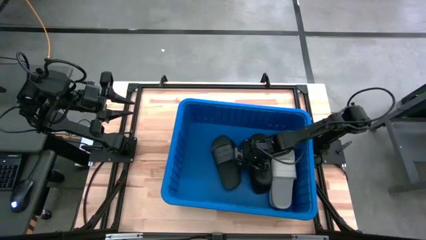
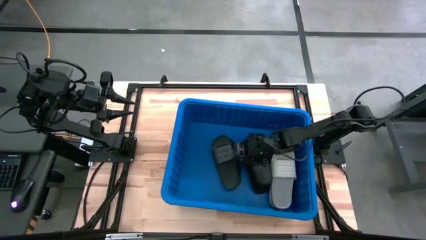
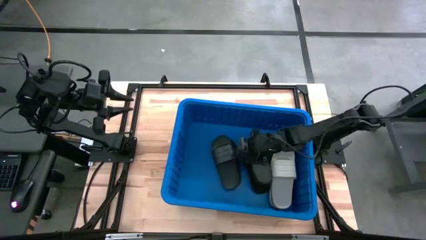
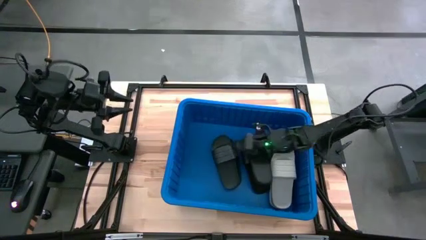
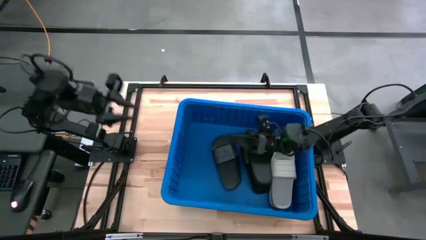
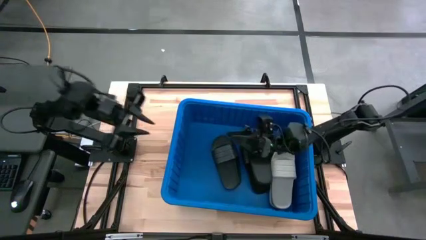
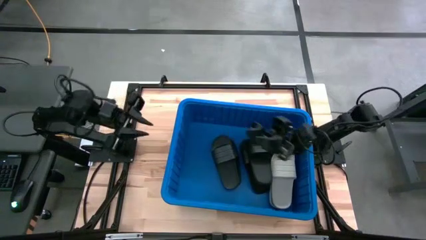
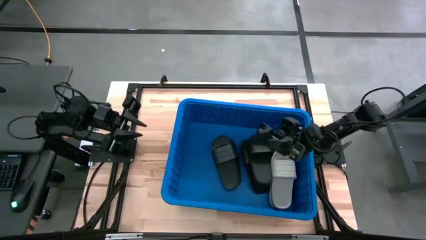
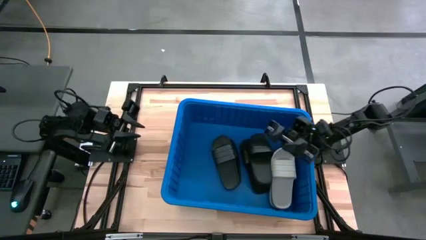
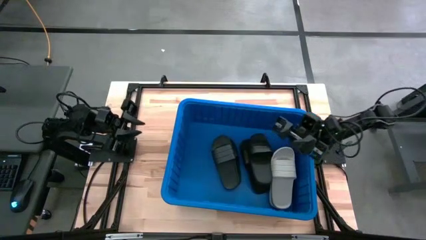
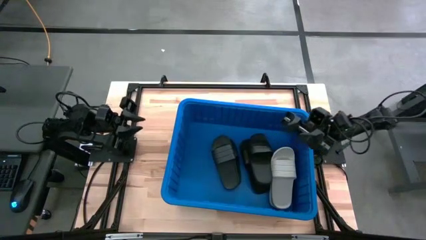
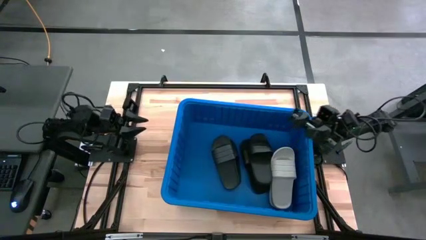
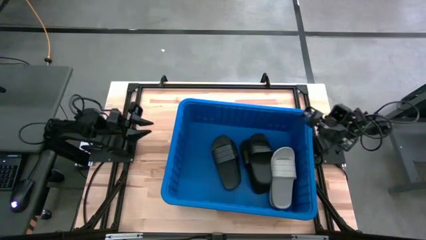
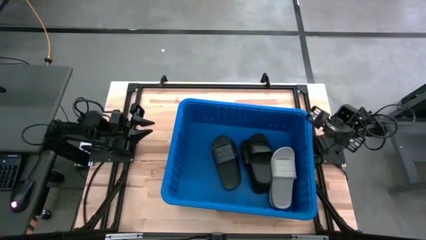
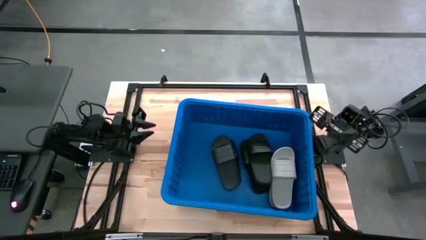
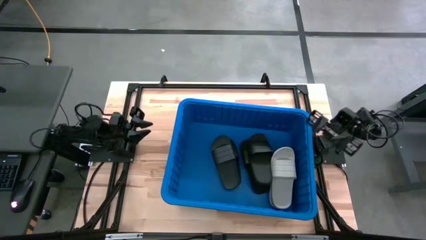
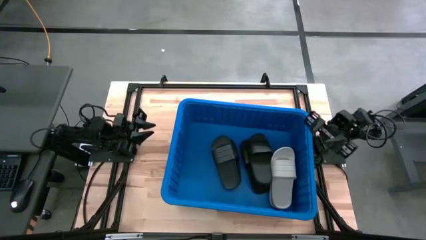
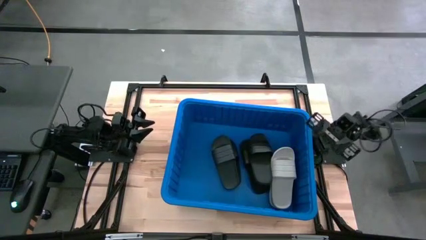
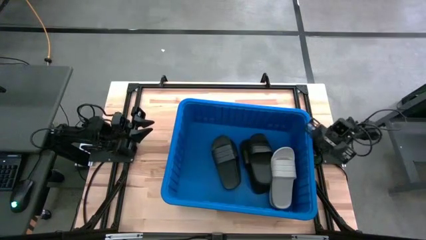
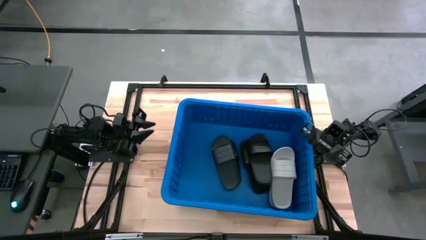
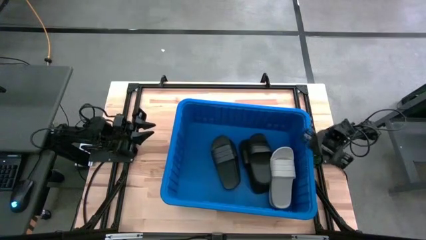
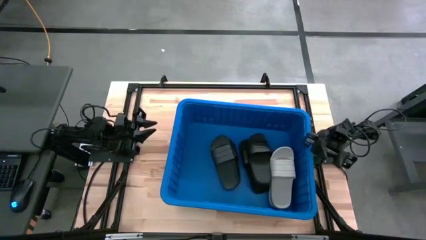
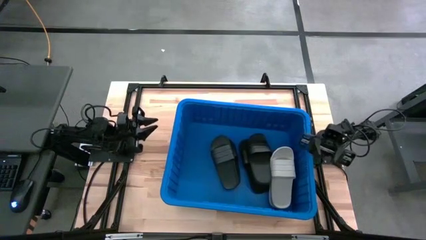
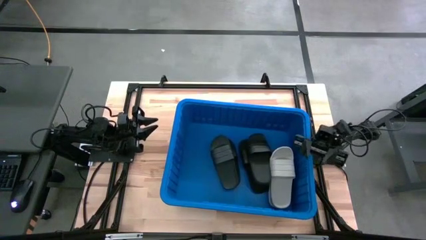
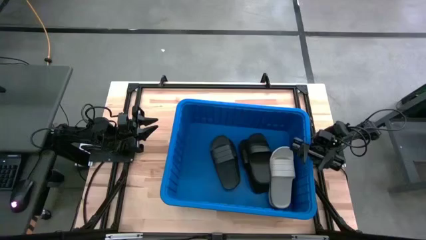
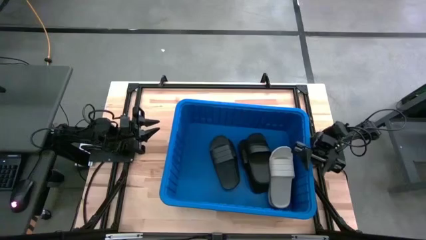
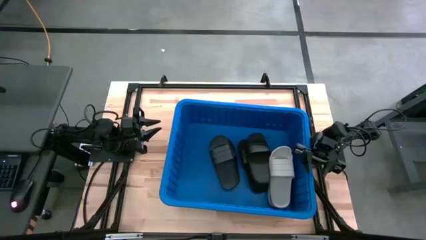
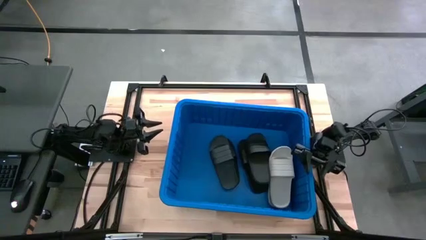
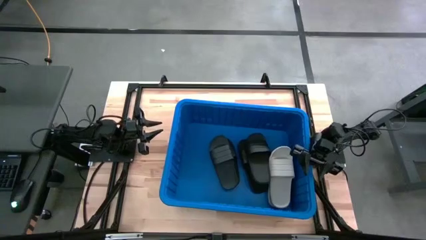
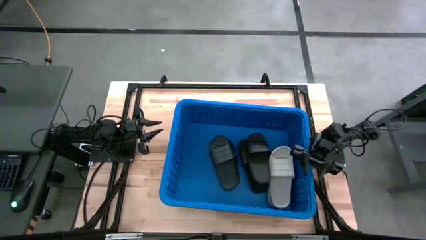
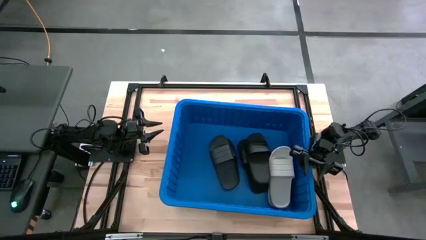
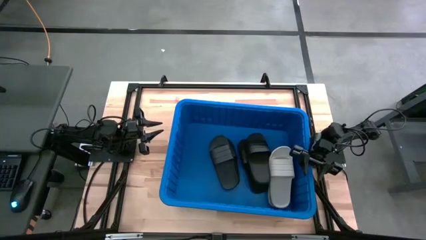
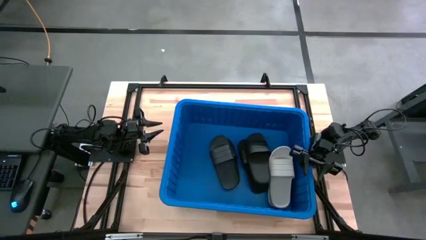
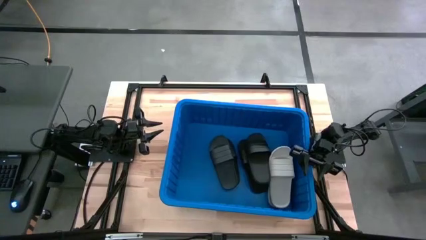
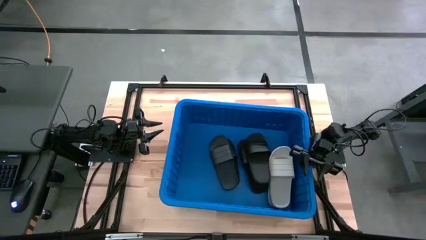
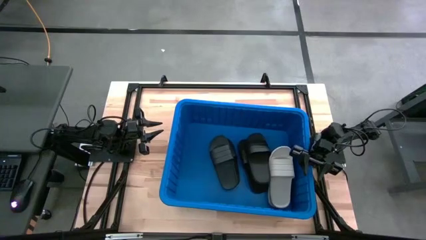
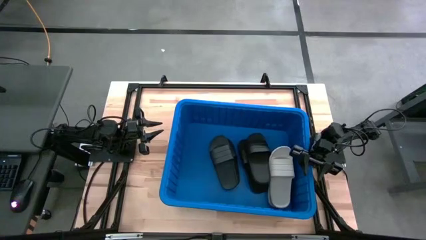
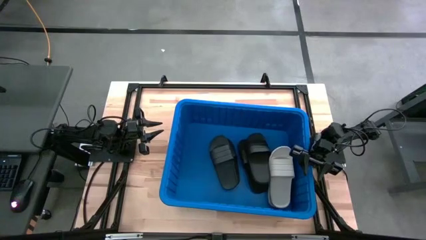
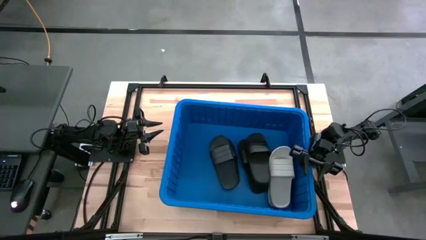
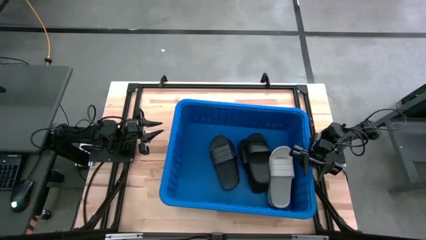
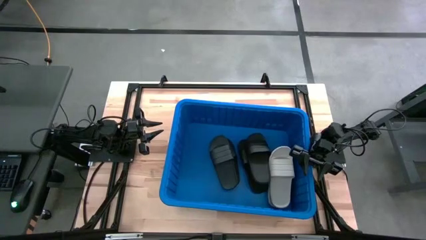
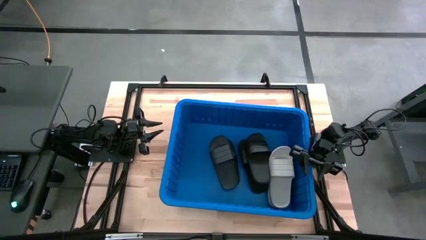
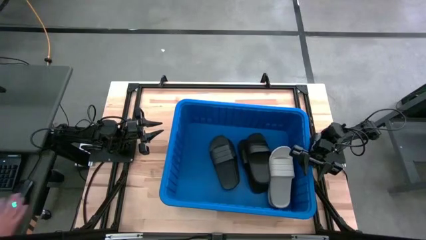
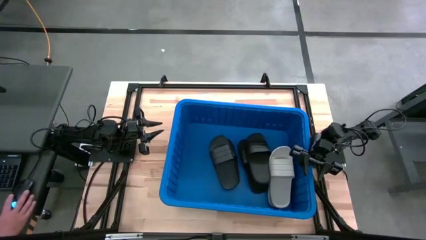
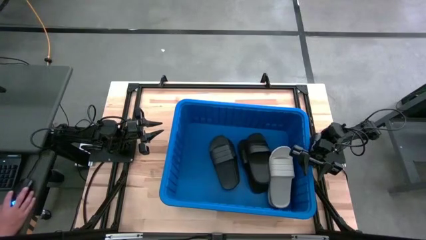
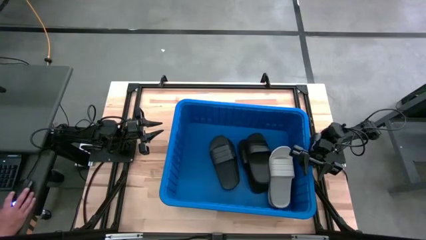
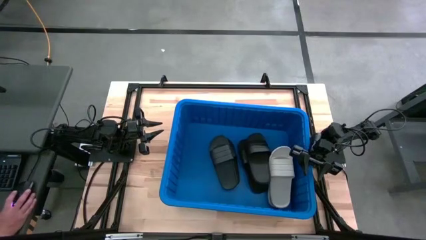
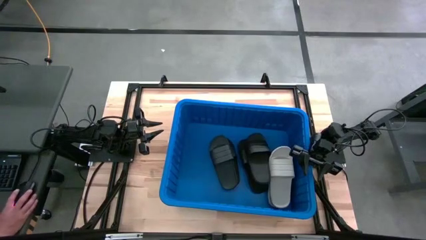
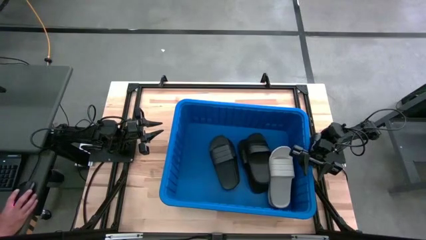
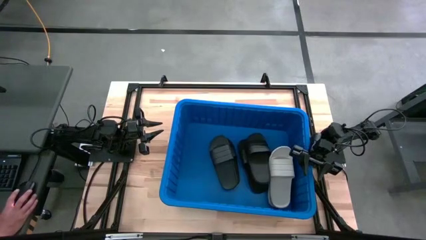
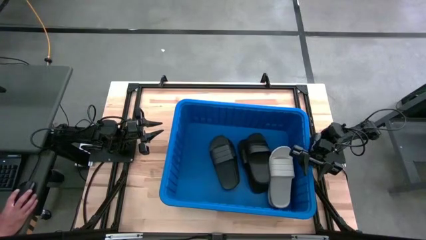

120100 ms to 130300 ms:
Task: Pick and place slides into bin
Return to Home Position
